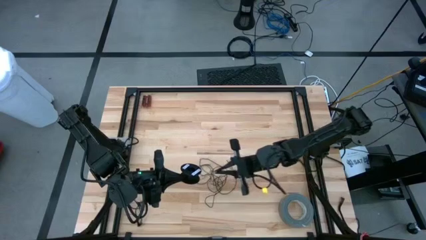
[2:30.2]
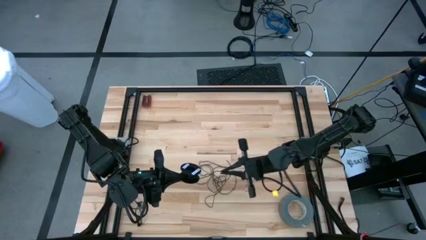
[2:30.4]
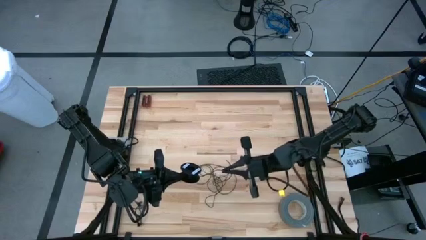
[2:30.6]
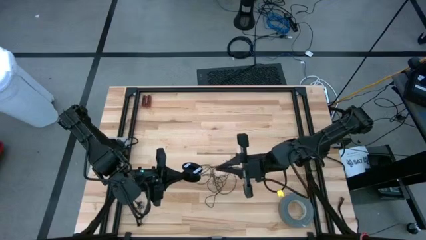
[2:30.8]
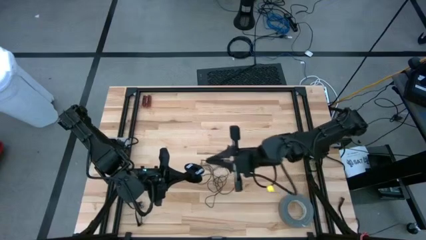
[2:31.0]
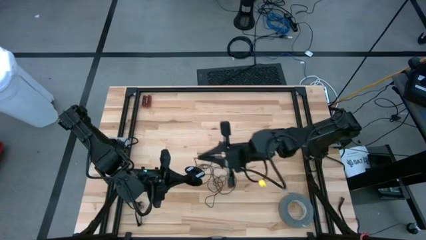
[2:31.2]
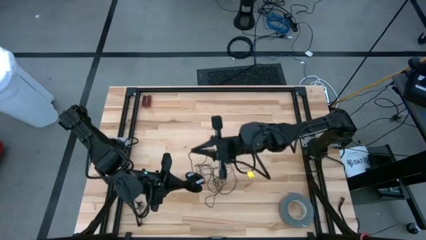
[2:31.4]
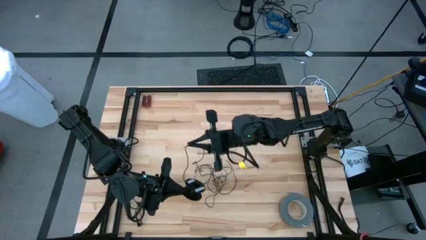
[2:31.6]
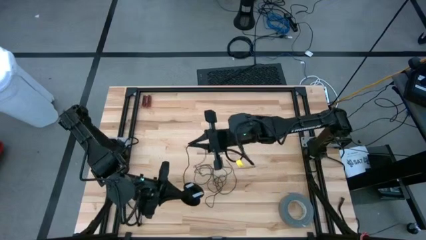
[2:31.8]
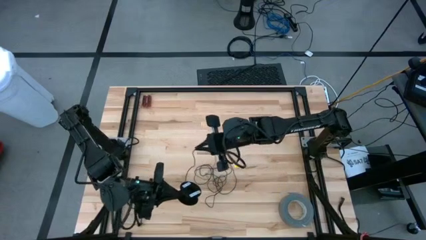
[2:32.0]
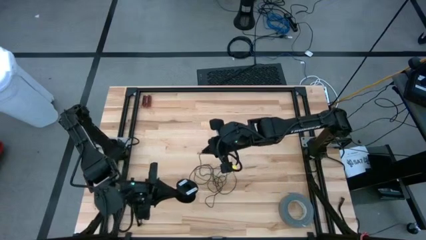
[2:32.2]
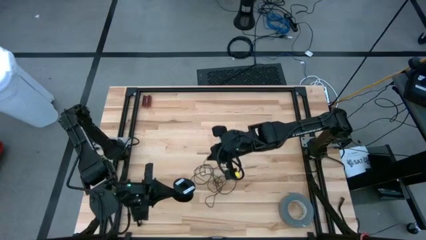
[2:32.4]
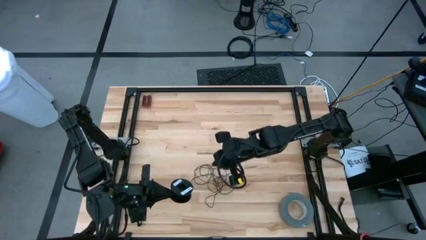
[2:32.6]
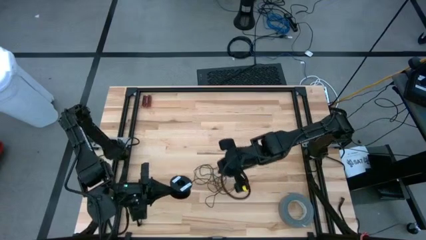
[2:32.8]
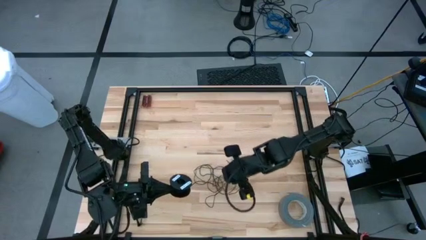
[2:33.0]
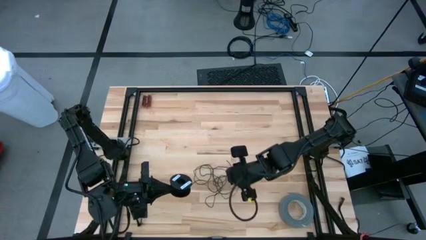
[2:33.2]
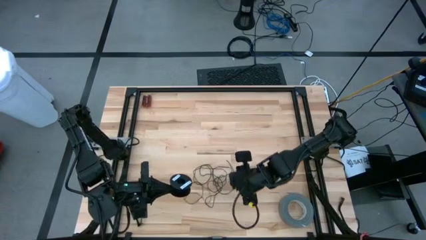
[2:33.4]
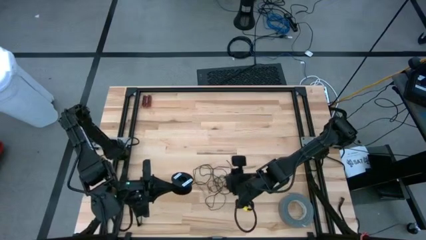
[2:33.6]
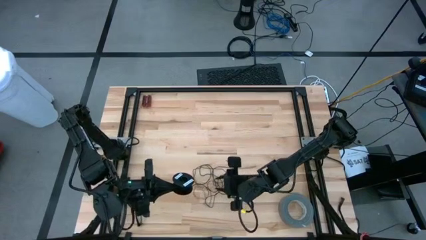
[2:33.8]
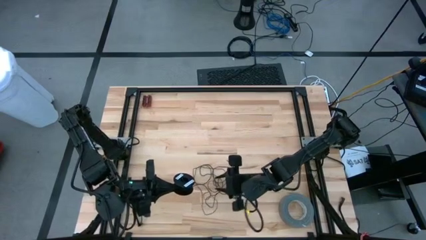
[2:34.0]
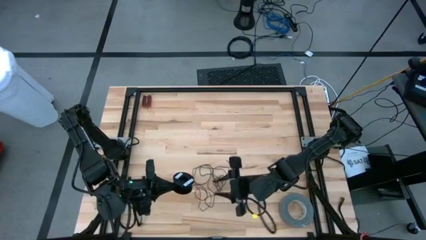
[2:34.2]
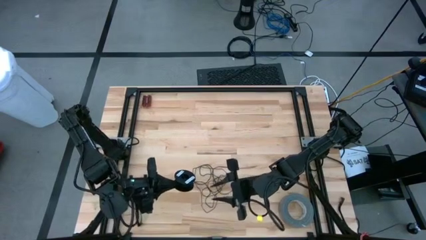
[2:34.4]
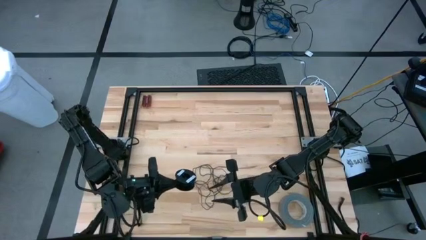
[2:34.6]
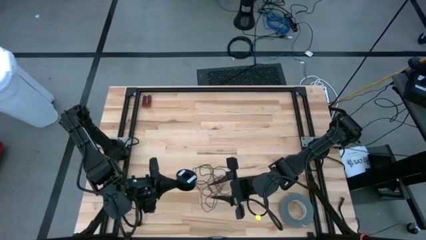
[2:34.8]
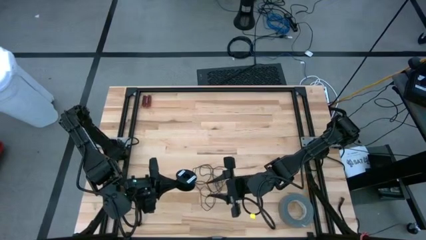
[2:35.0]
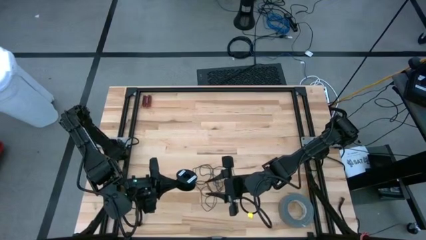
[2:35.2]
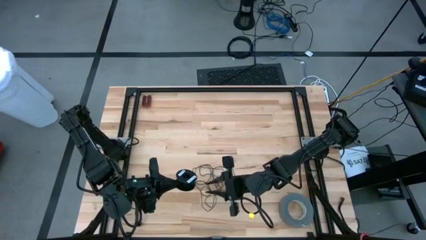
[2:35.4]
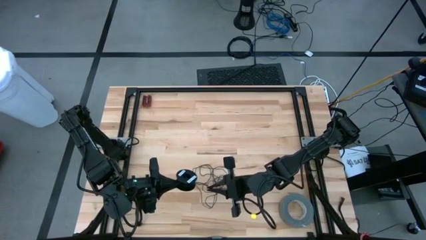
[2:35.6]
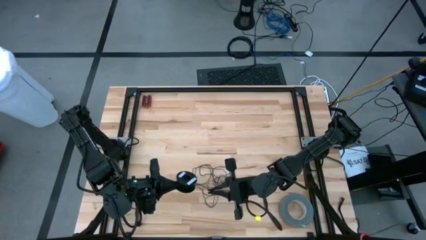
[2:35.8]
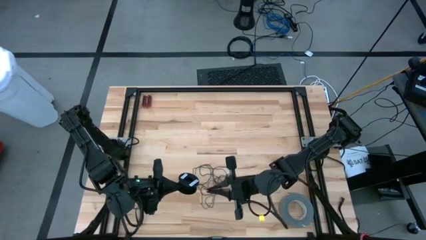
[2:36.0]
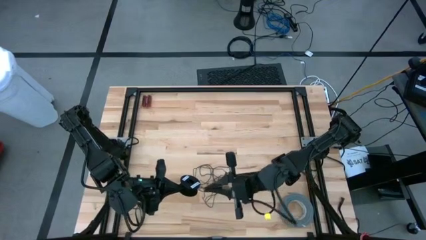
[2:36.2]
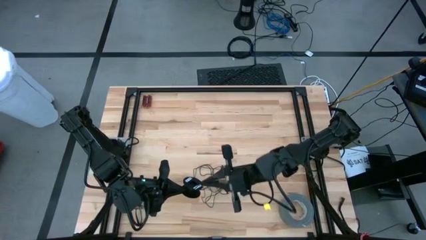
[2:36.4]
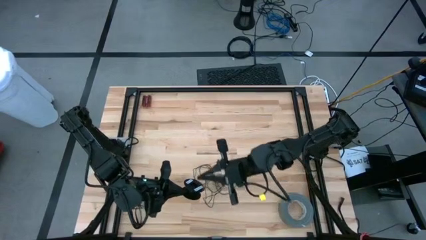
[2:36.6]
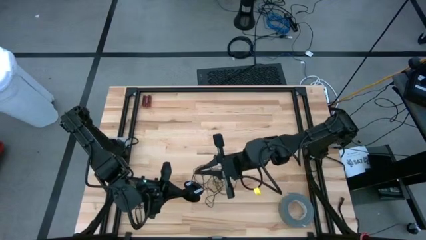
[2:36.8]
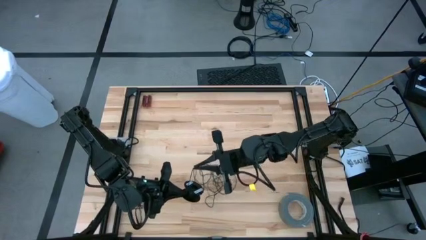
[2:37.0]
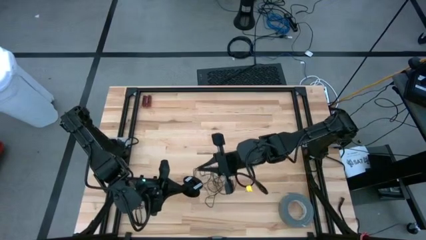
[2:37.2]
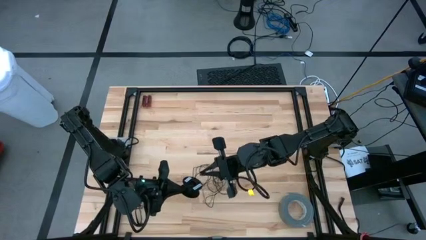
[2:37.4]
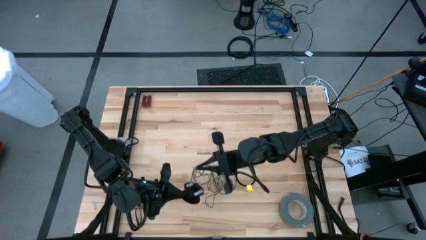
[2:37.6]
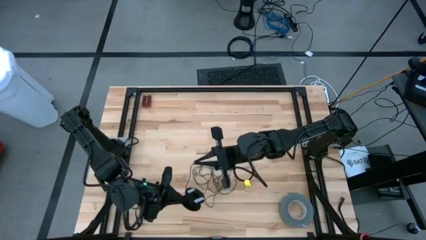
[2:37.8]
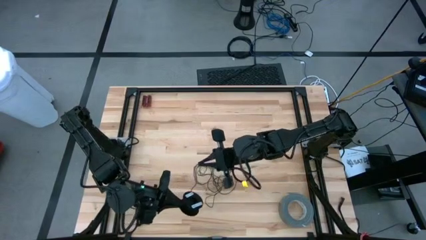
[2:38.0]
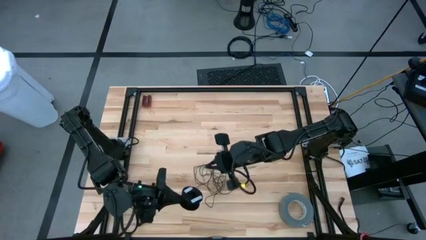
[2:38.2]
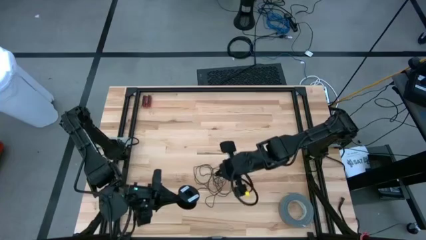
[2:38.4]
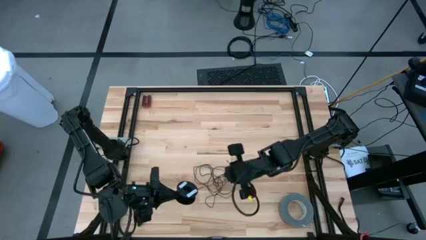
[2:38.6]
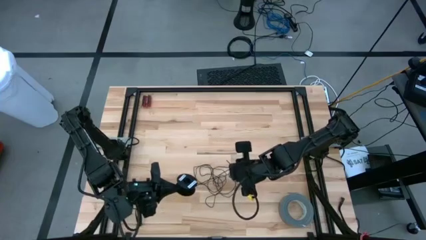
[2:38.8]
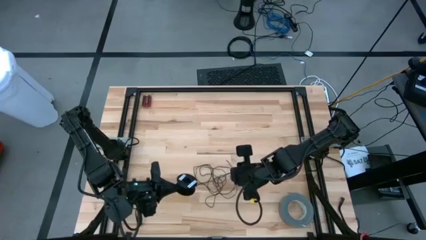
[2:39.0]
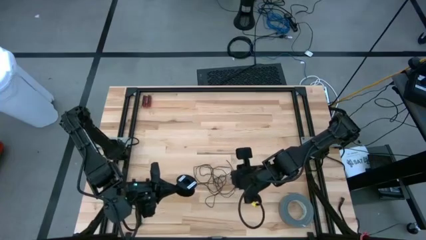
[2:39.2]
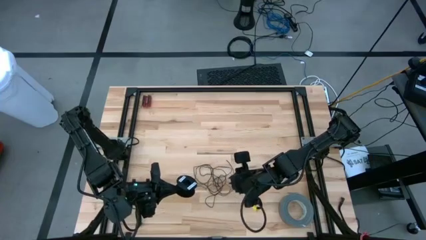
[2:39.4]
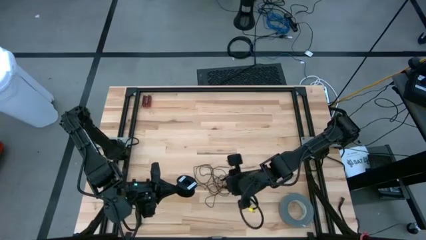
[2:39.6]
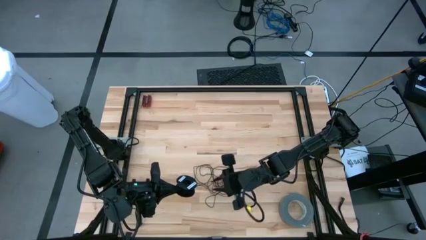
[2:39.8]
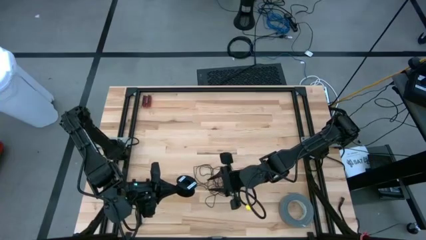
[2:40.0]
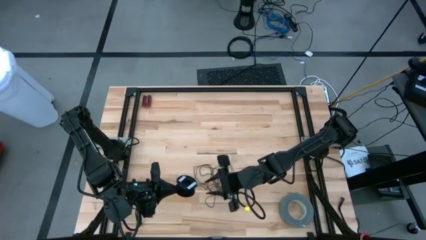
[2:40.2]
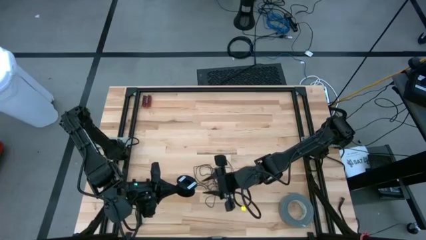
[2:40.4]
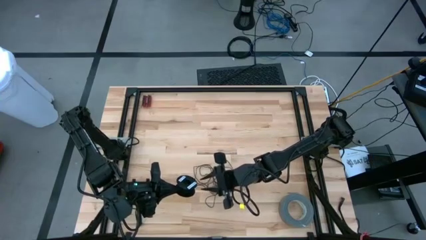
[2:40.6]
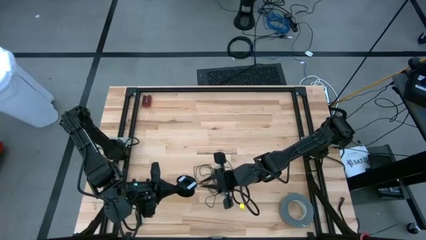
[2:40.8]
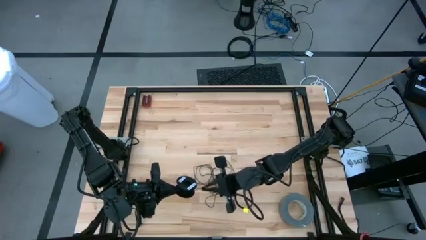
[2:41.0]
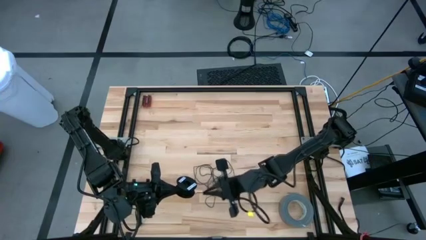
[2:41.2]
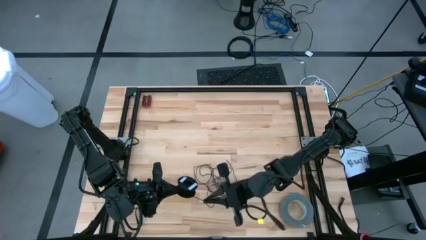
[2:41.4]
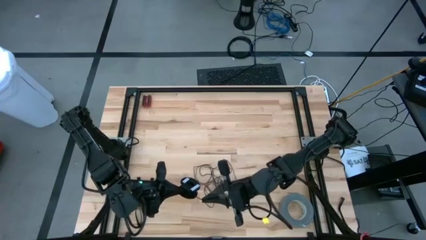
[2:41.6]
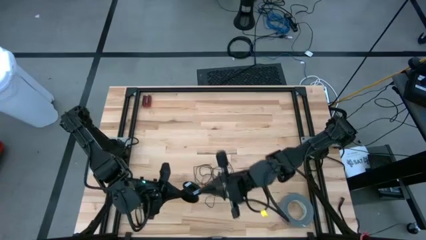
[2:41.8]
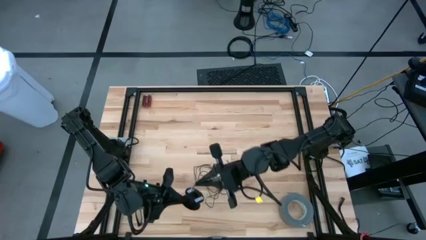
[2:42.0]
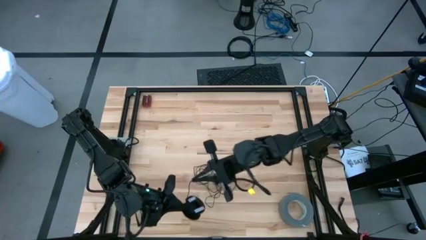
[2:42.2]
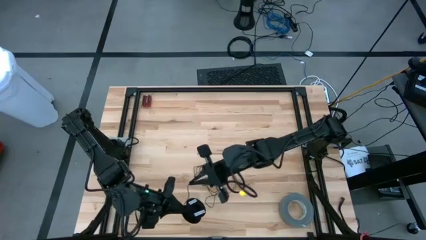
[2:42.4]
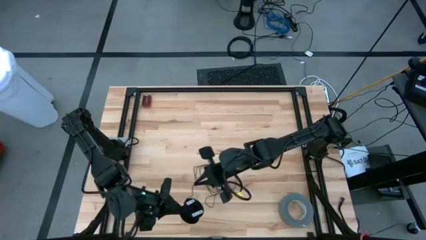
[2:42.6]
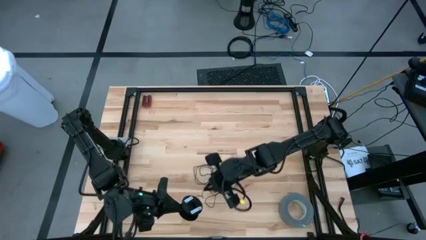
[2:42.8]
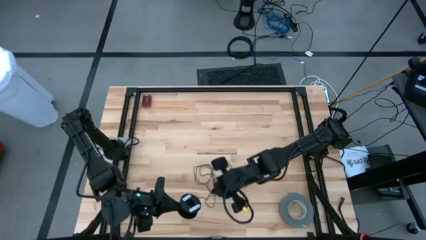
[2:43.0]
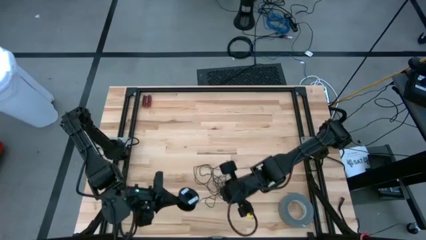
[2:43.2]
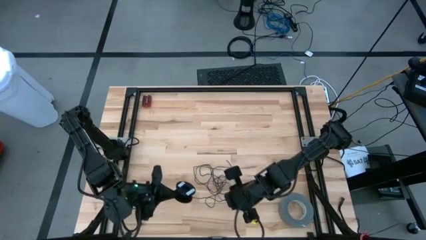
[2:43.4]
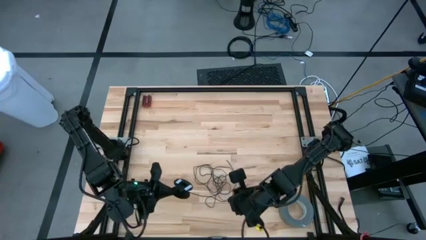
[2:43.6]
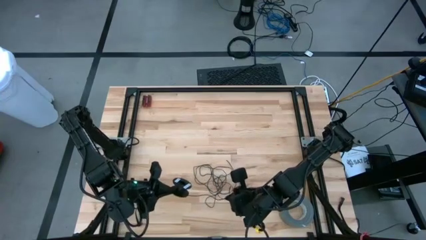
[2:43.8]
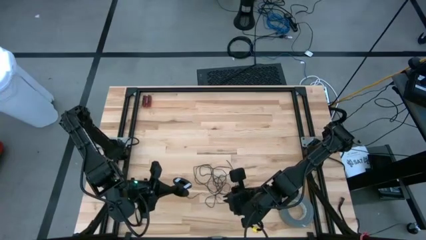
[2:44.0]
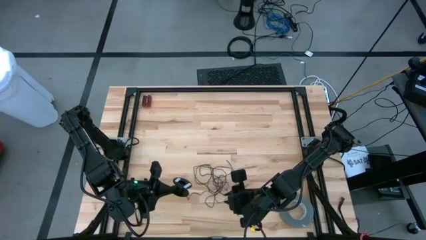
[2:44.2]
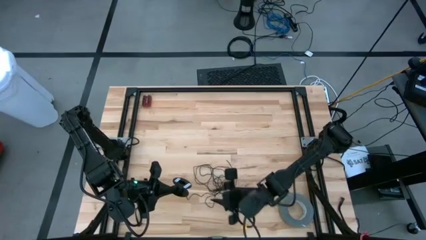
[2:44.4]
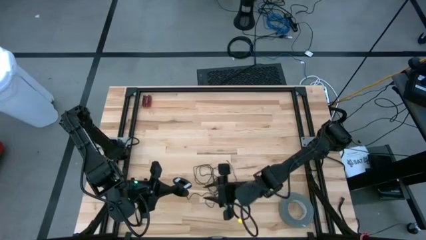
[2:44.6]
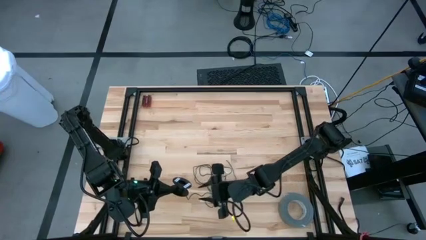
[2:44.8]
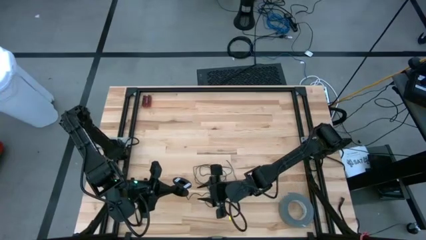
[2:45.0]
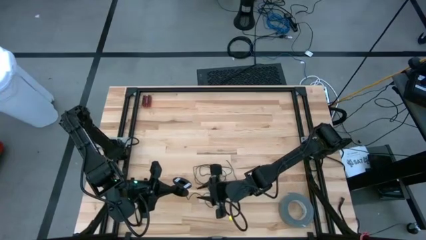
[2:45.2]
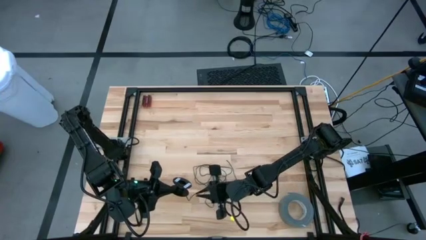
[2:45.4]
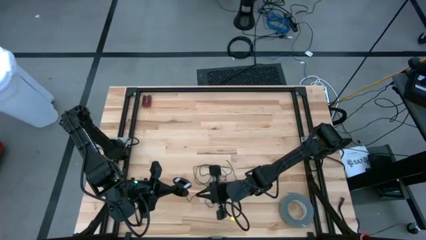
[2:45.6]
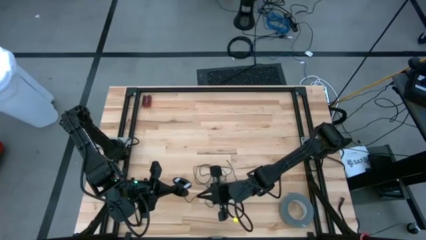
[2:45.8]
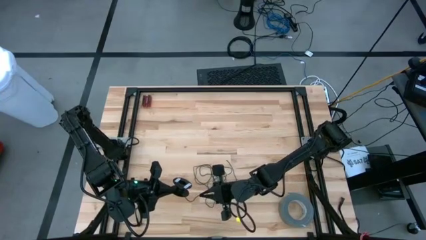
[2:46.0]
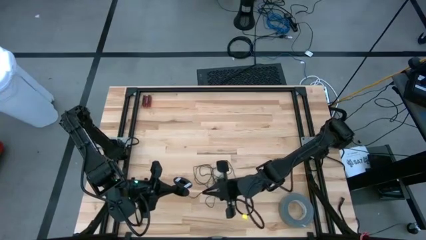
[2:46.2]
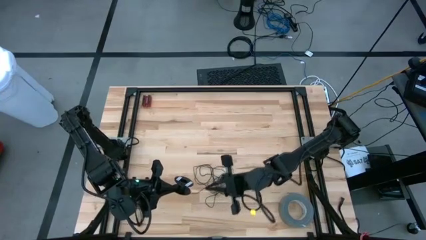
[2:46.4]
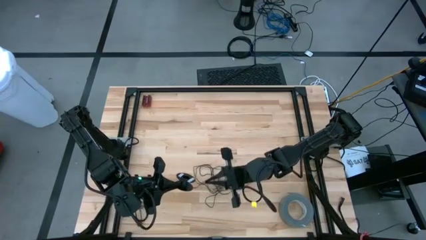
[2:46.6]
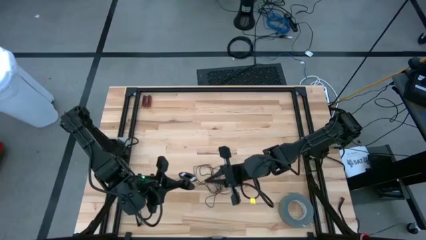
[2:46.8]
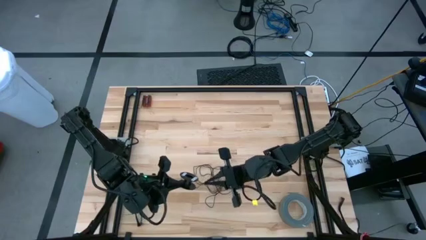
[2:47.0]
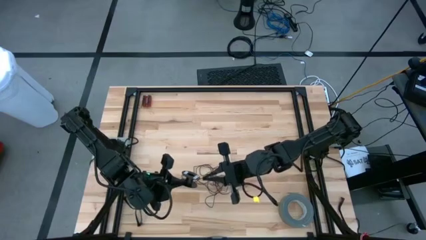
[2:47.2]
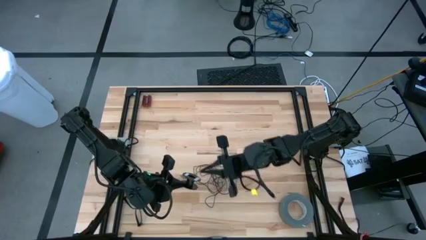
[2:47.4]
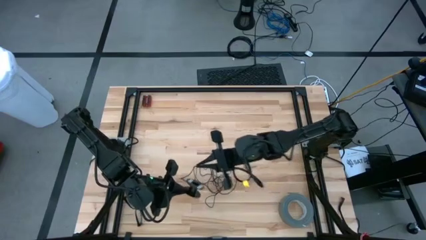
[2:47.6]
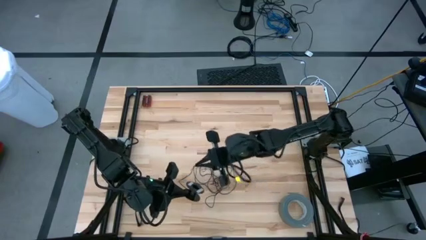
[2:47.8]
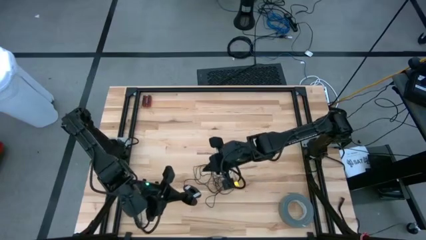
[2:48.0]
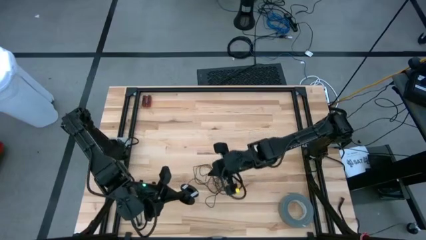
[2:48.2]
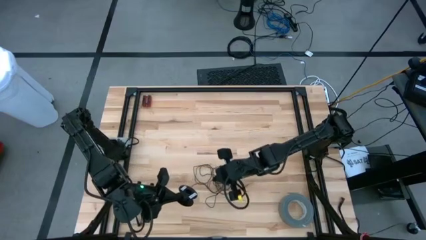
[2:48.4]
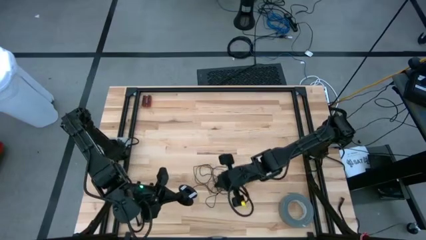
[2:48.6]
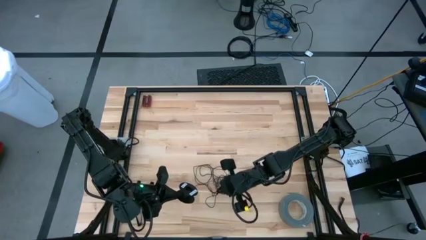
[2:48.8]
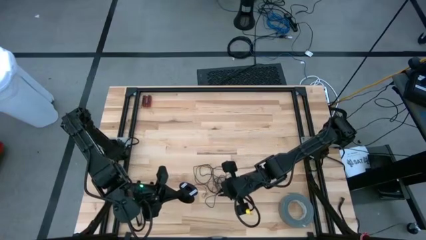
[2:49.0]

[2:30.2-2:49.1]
Task: Coil cords
Uncoil the black wire from the spool
